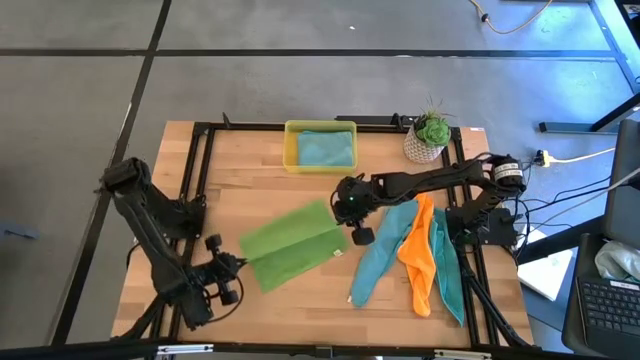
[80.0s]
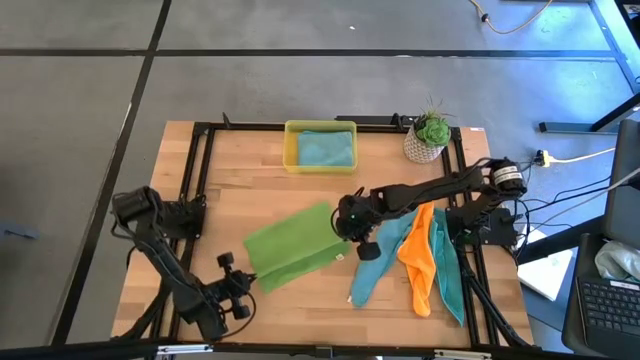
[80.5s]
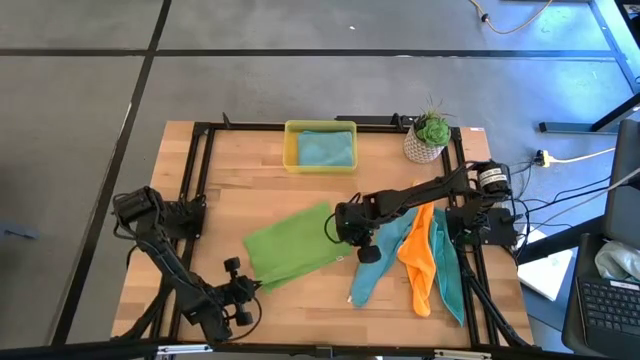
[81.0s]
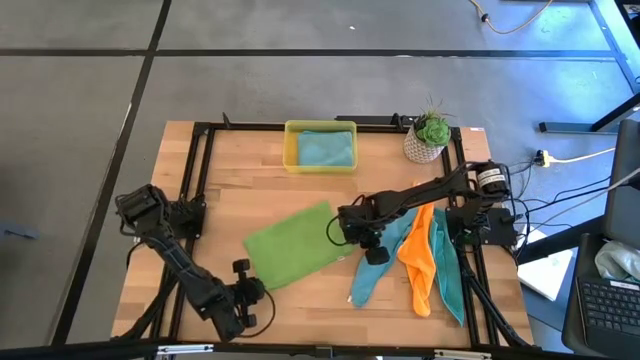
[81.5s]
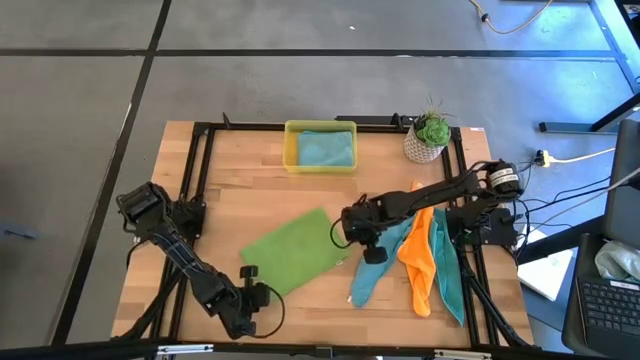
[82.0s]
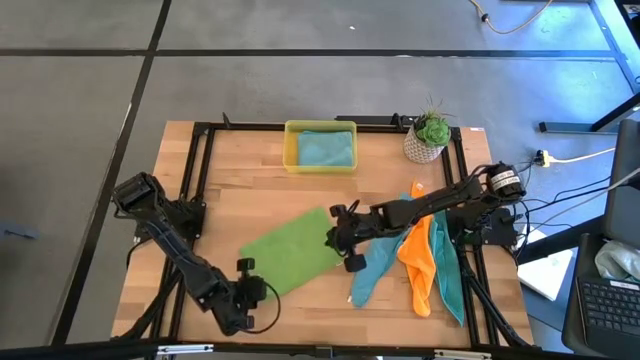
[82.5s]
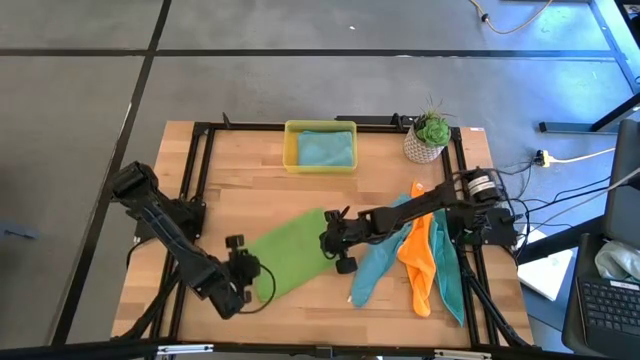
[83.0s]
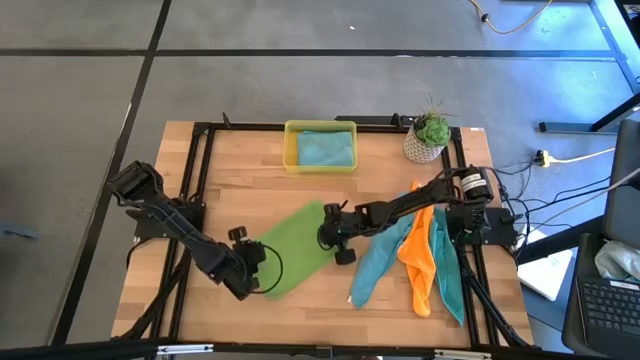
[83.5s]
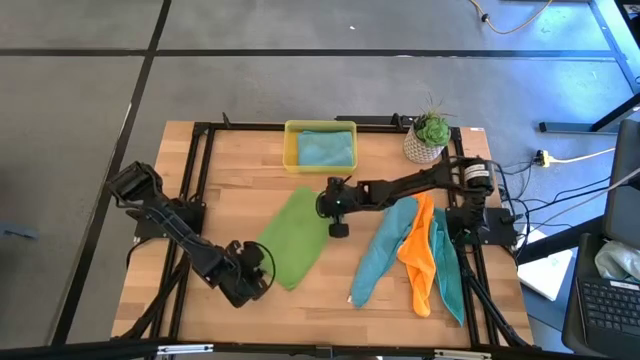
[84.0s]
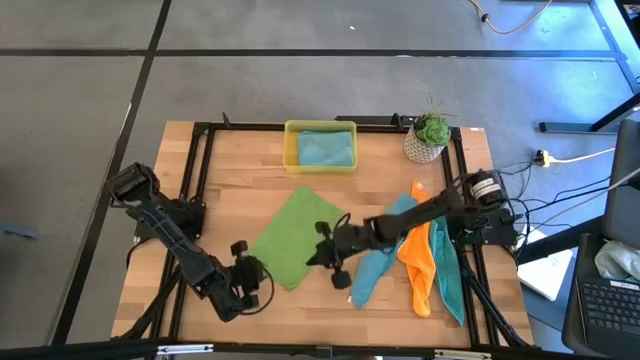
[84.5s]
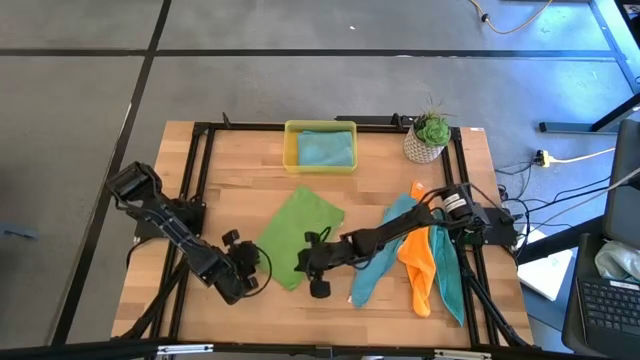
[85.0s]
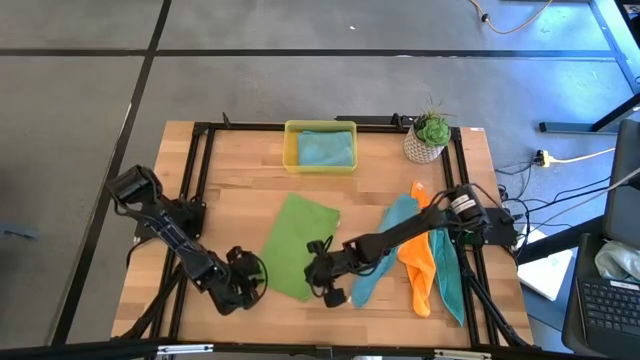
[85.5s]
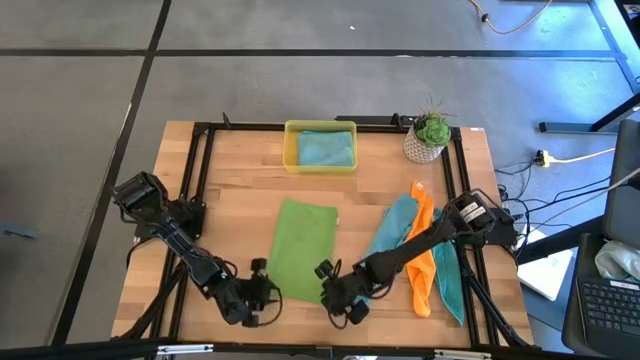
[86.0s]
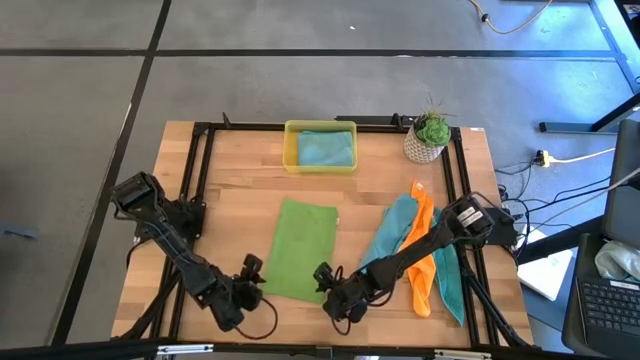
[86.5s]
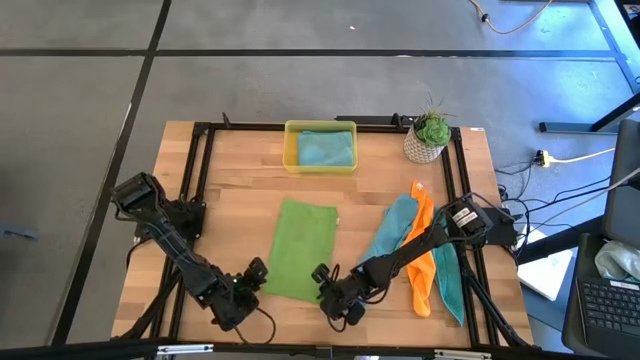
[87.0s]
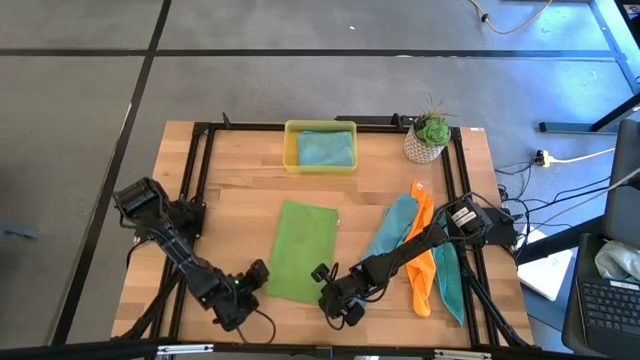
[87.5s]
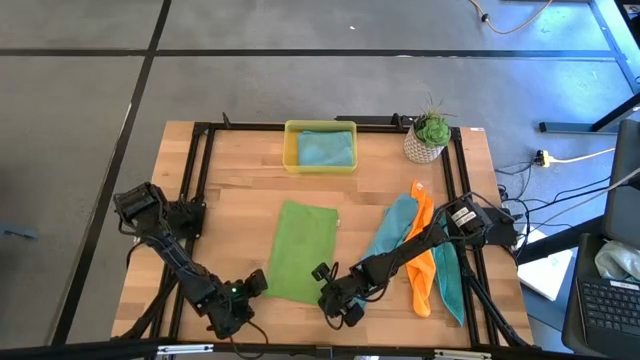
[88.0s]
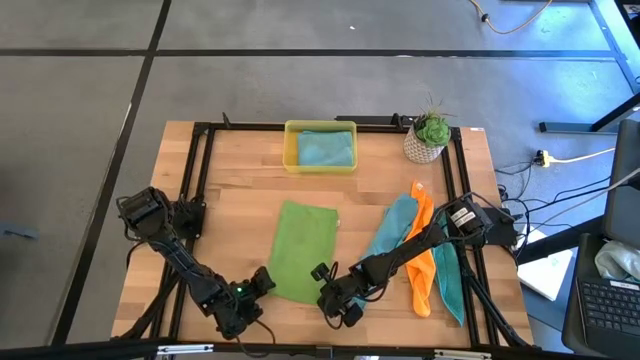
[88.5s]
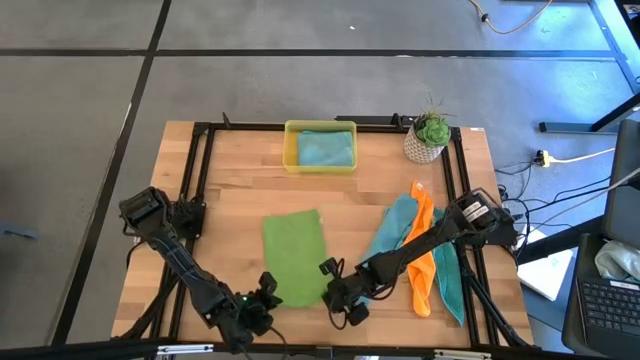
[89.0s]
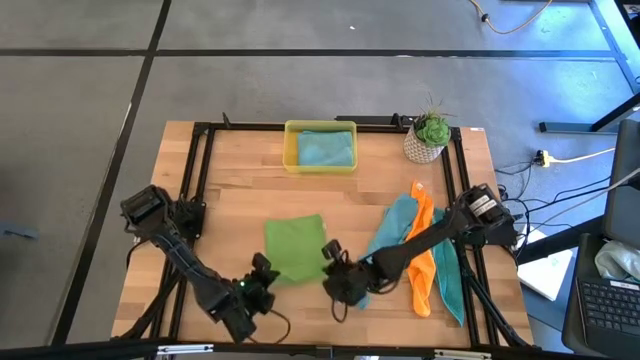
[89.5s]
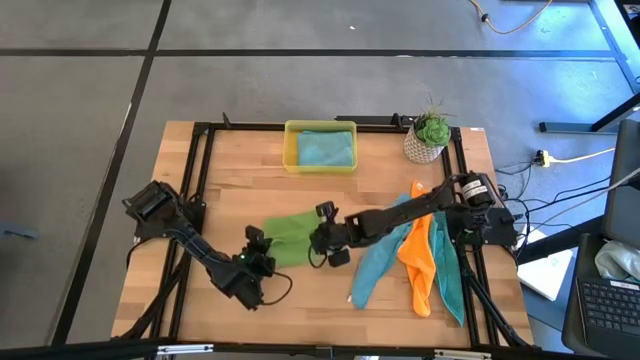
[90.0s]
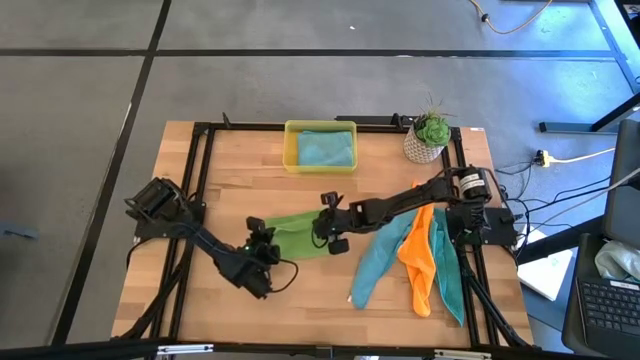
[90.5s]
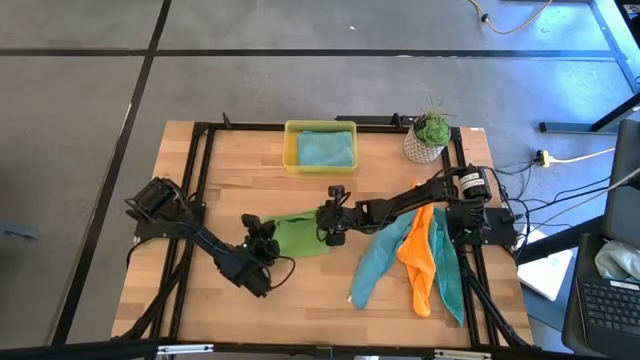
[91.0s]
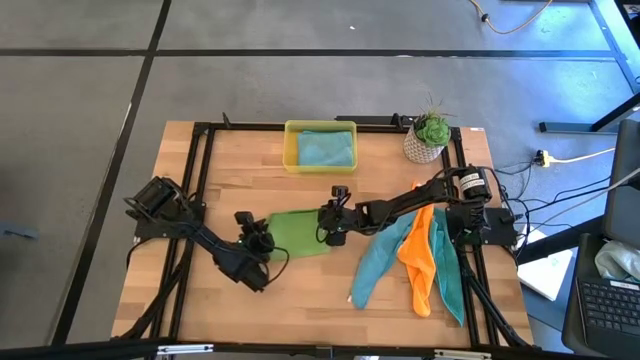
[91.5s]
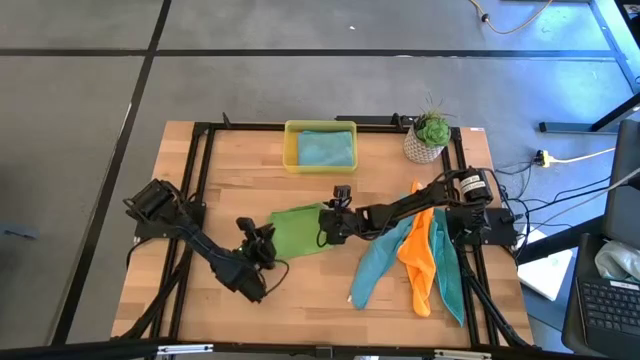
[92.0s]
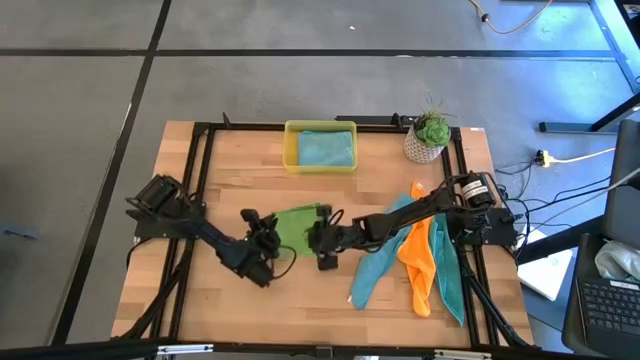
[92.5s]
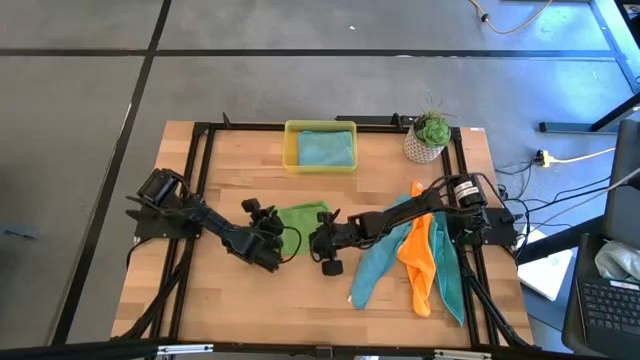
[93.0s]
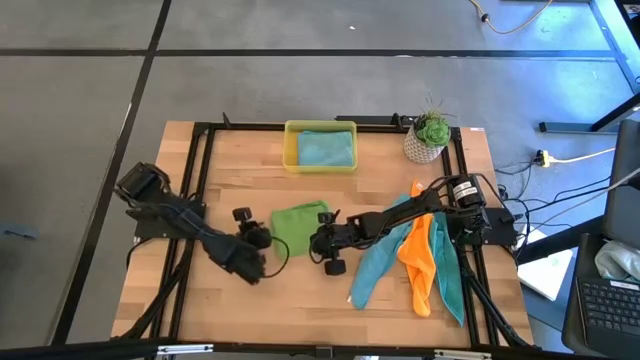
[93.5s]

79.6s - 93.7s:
Task: Fold microfiber towels
Fold the green cloth

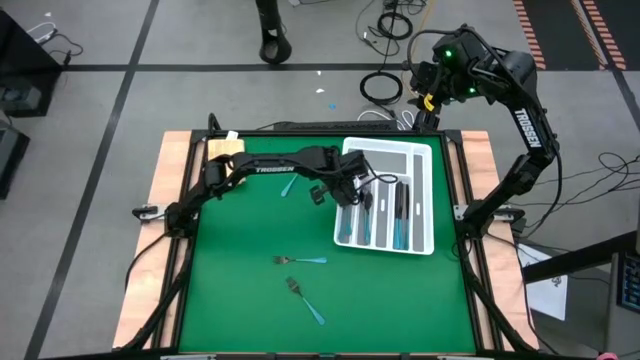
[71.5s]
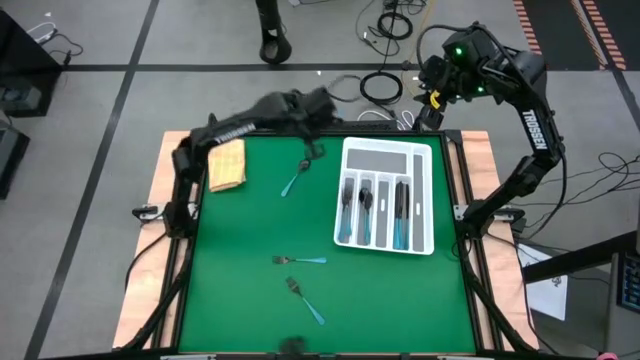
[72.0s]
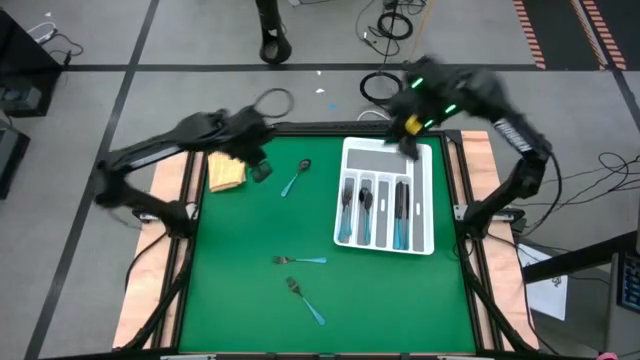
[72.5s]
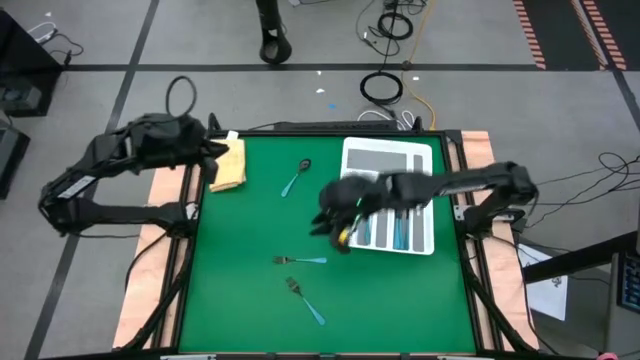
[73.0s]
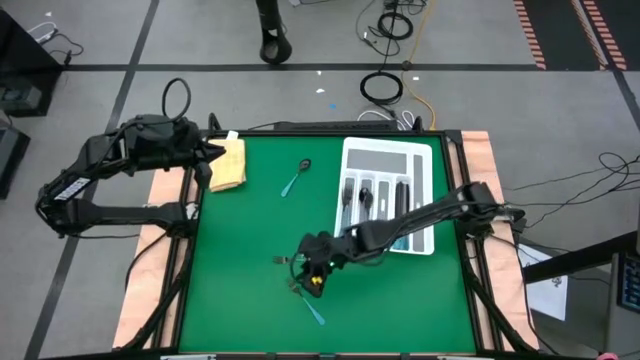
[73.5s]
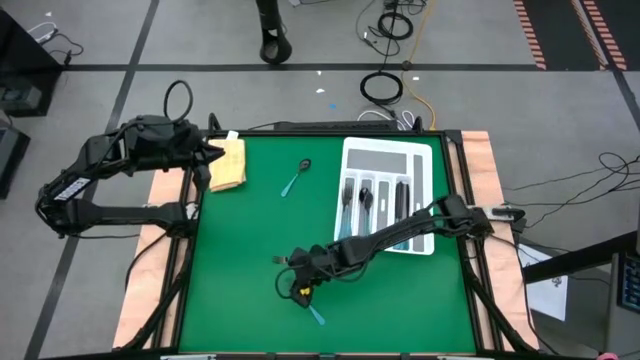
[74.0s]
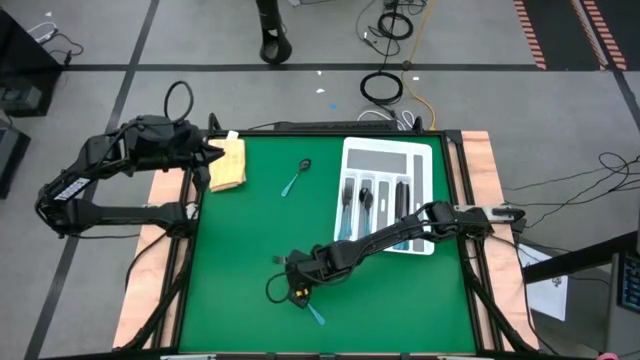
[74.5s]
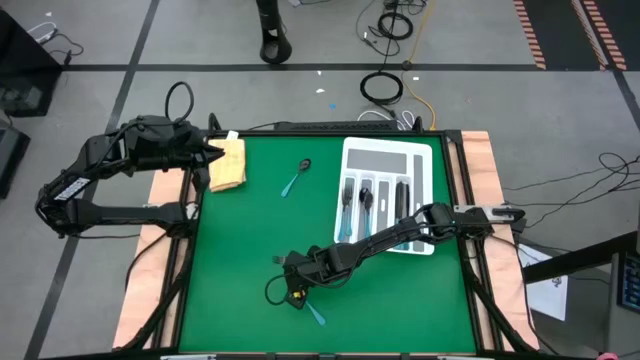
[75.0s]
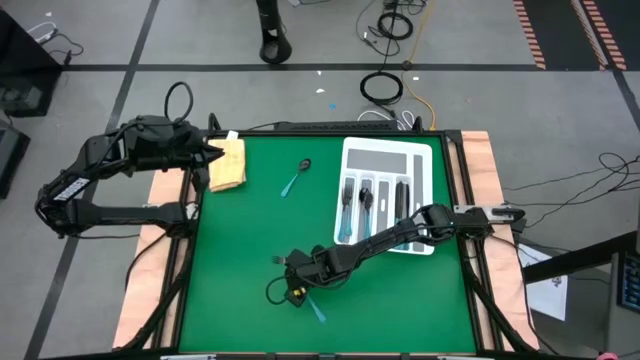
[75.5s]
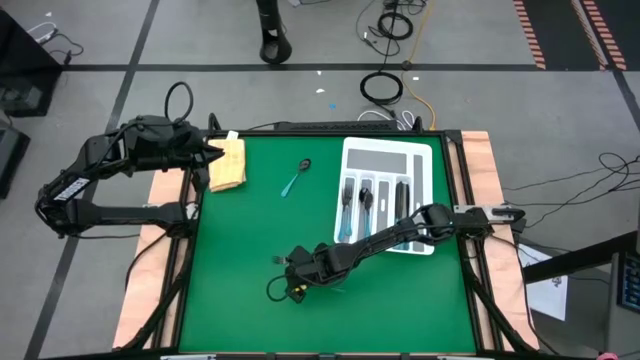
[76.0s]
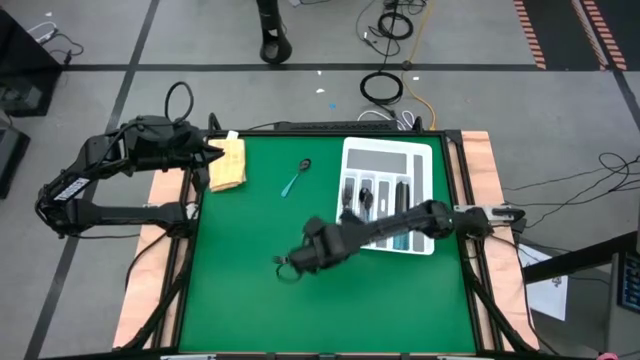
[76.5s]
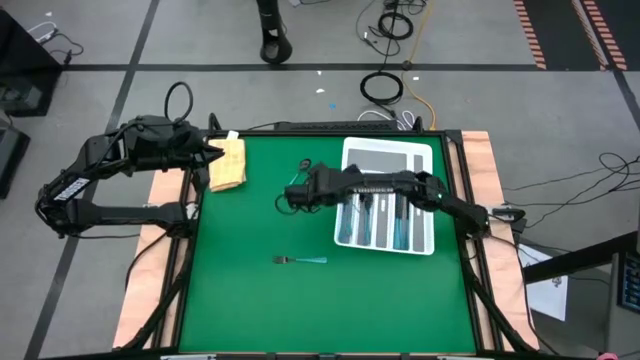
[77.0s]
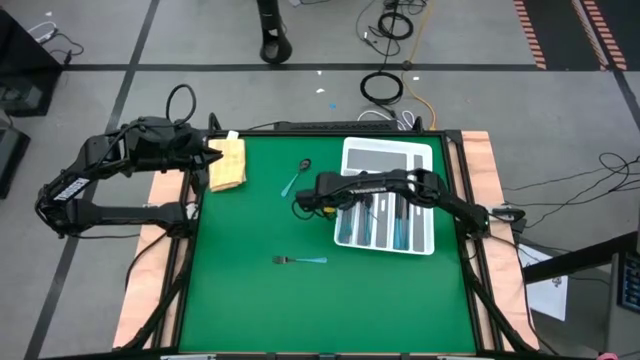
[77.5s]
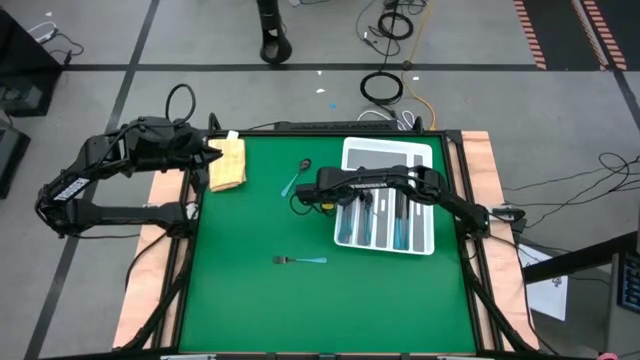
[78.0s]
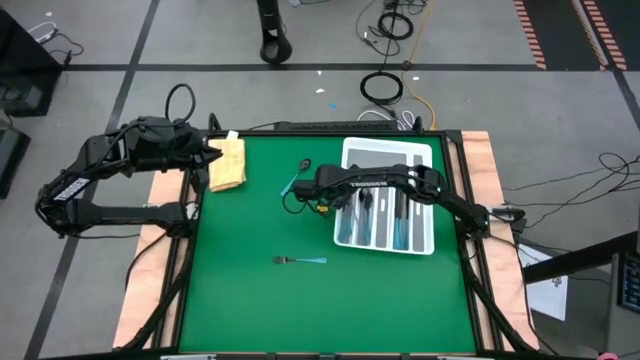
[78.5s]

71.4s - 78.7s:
Task: Sort silverware
Put the blue fork into the silverware tray with the other blue forks

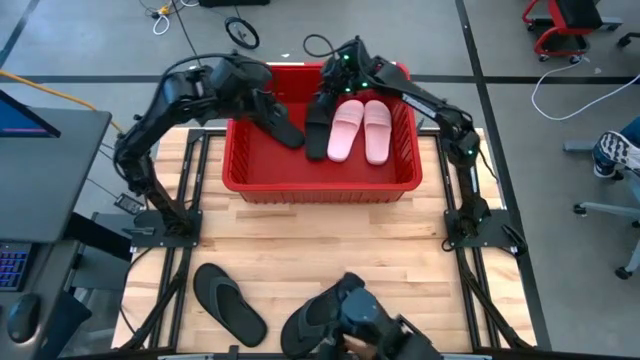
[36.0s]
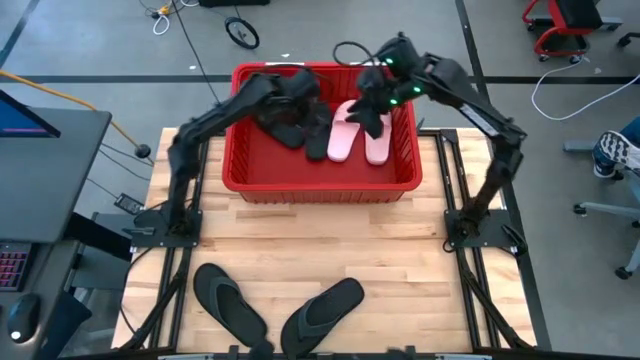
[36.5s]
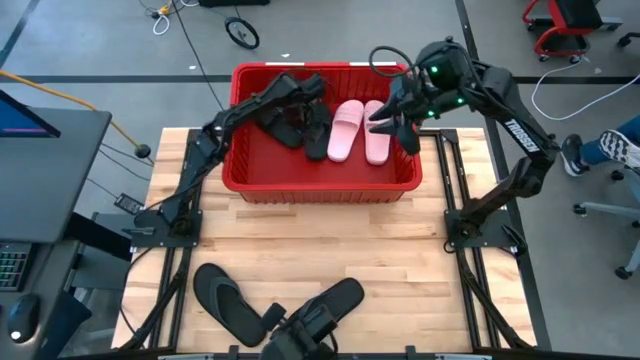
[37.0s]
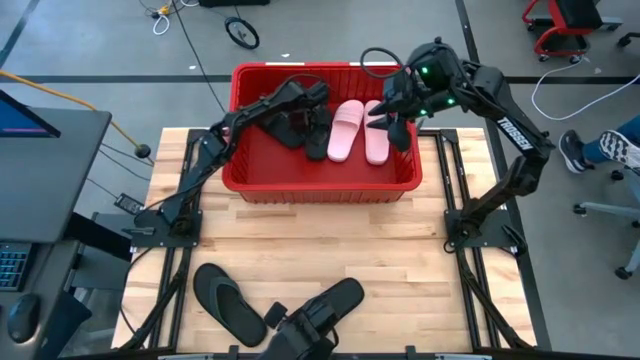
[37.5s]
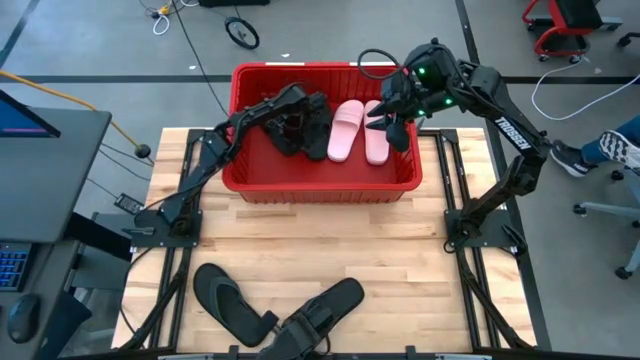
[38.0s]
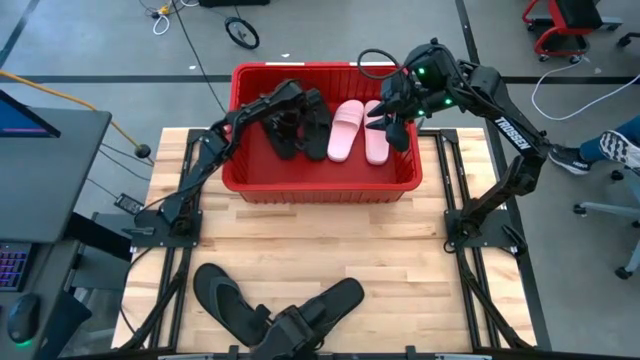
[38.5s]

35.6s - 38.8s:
Task: Pick and place slides into bin
Adjust the black slide
